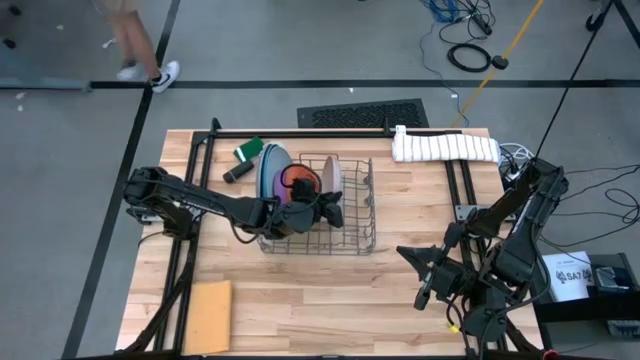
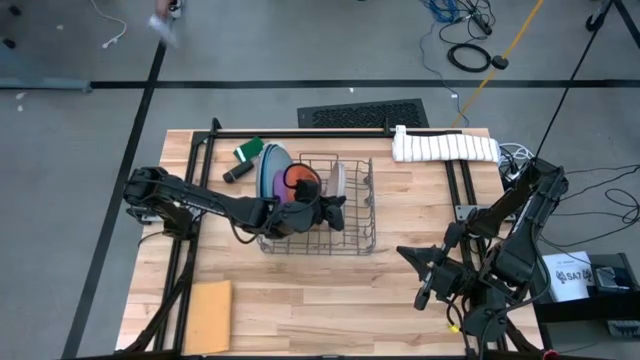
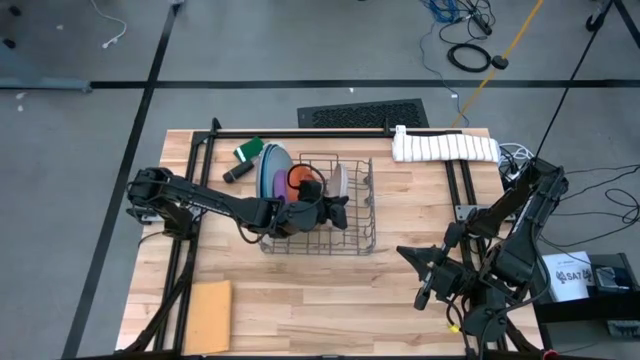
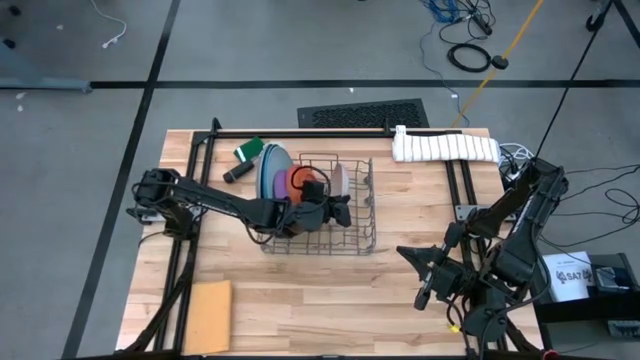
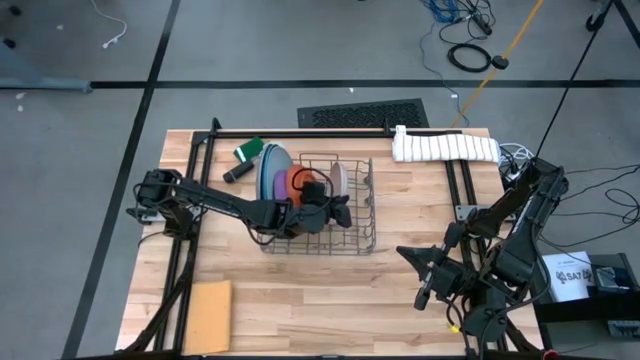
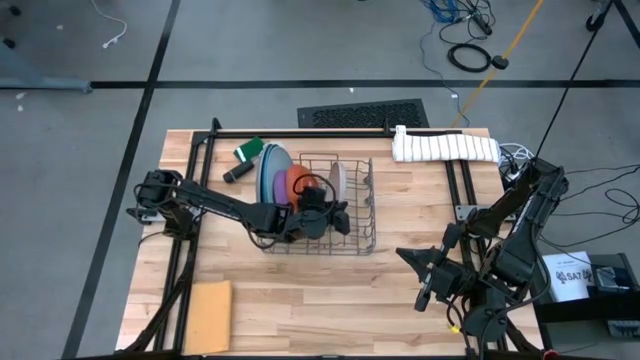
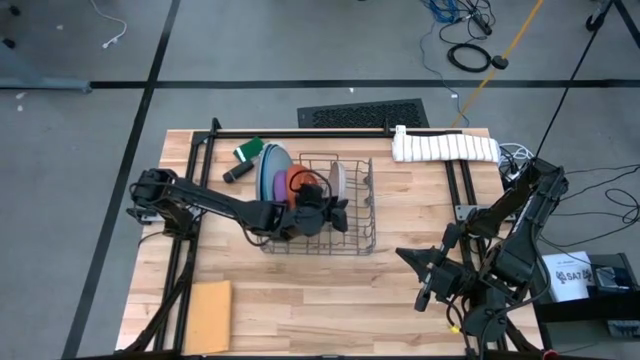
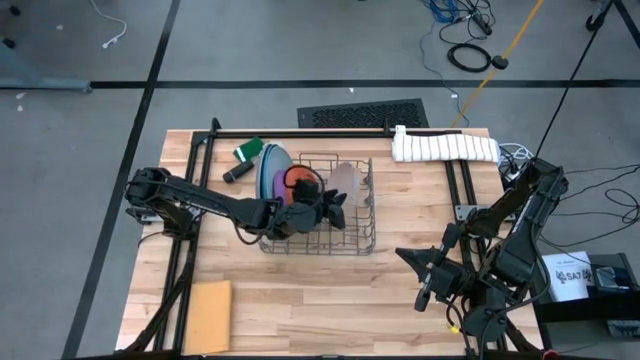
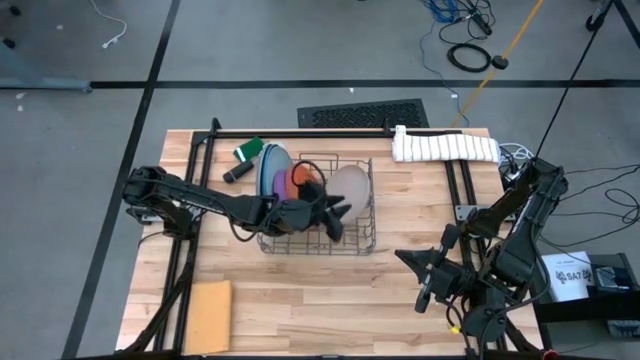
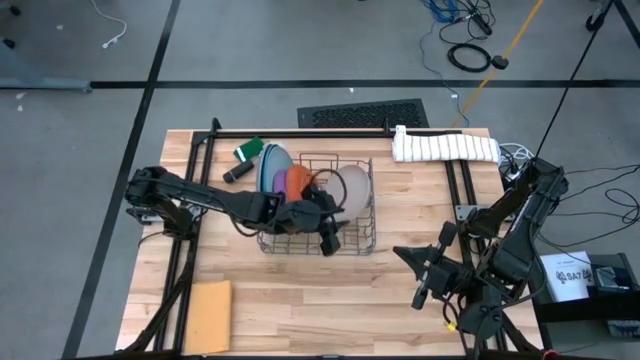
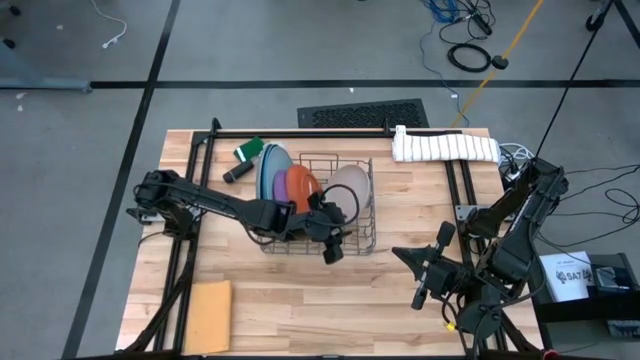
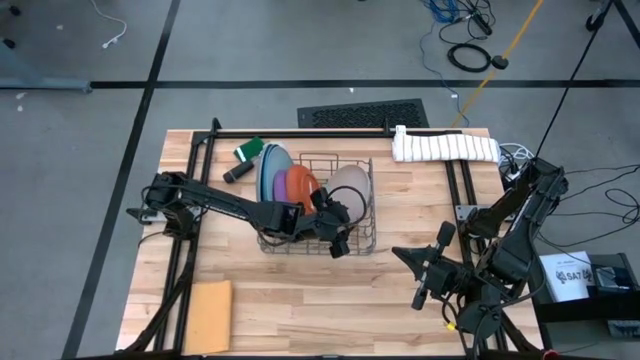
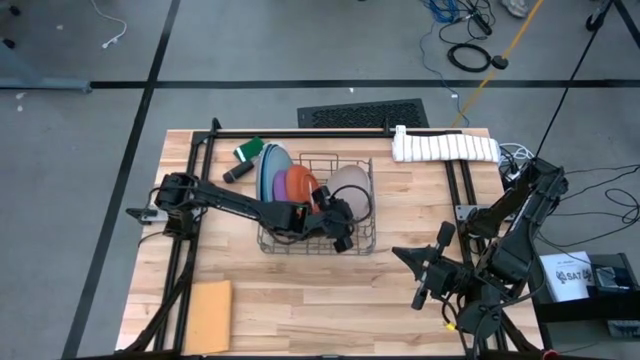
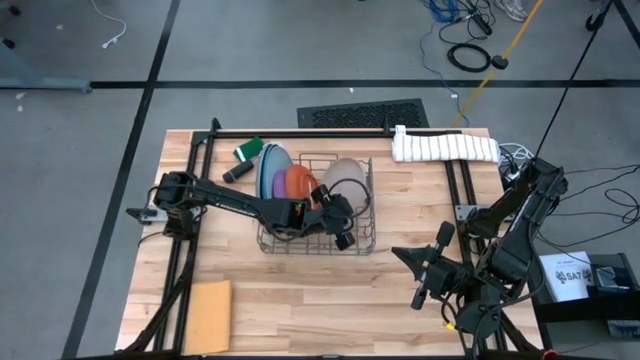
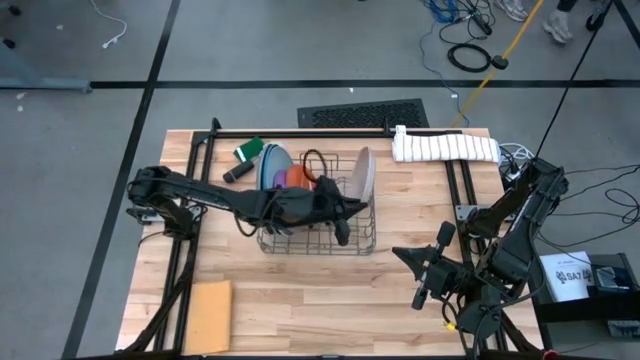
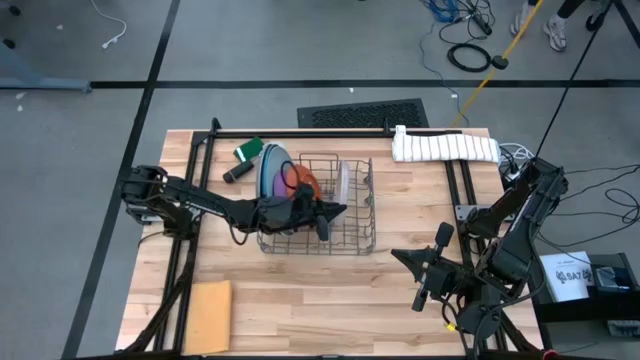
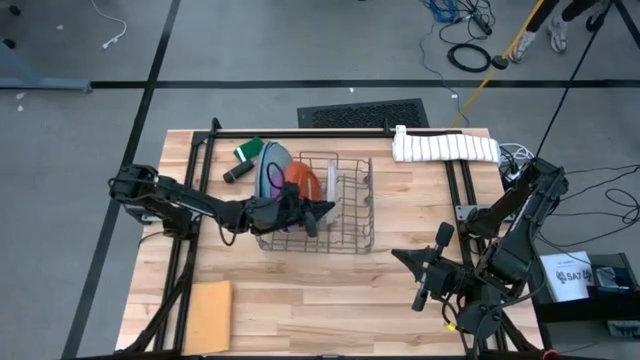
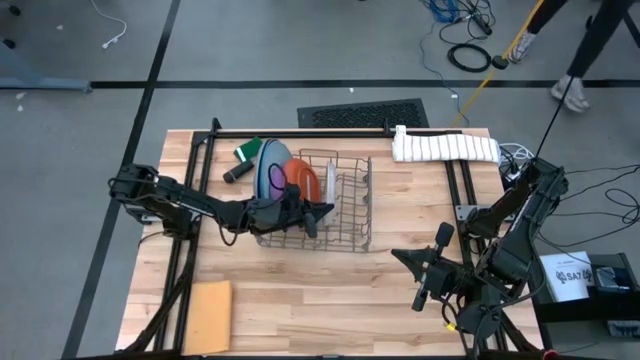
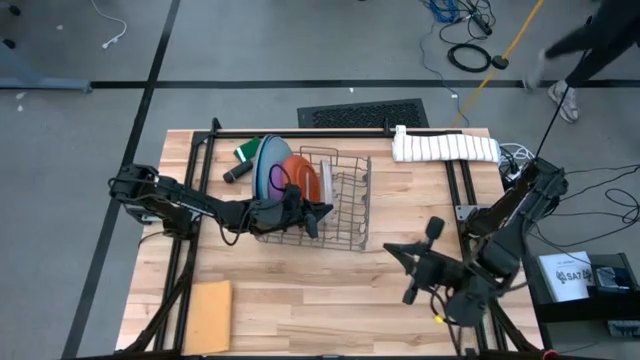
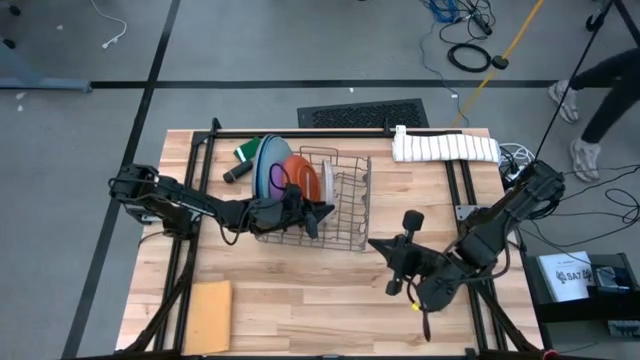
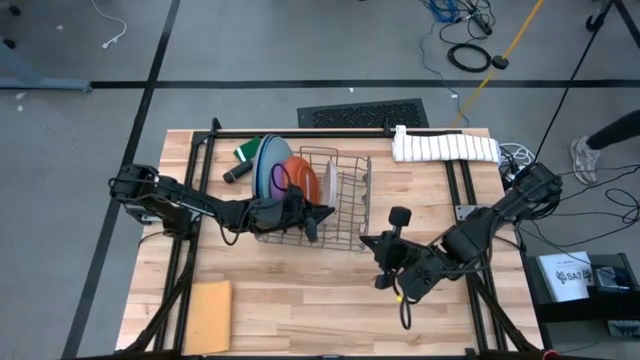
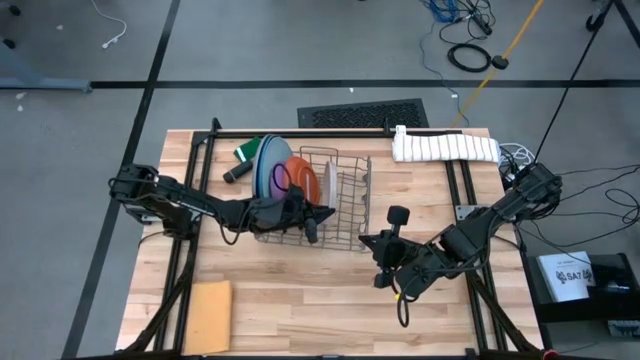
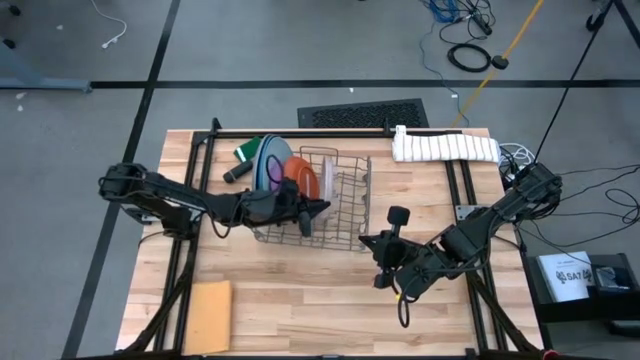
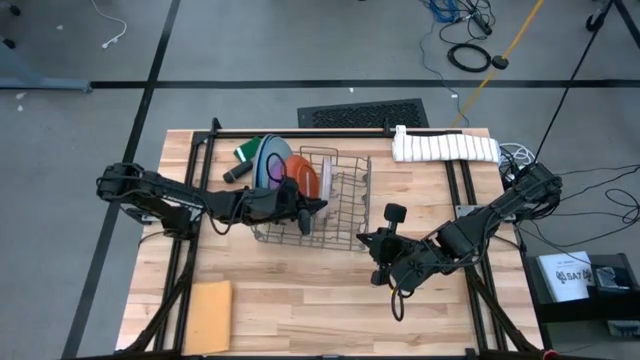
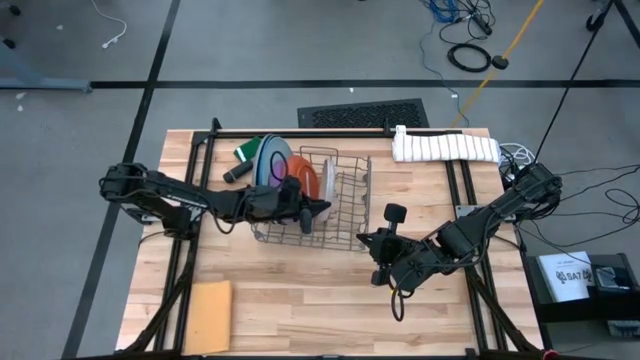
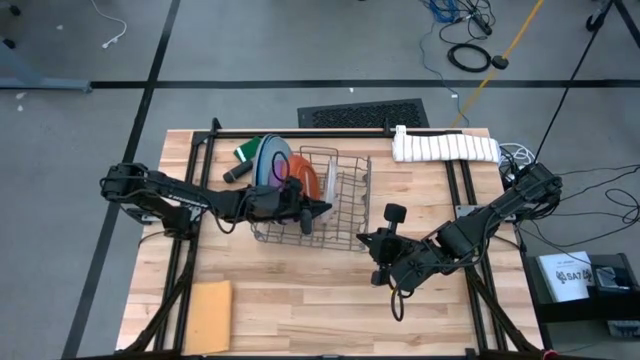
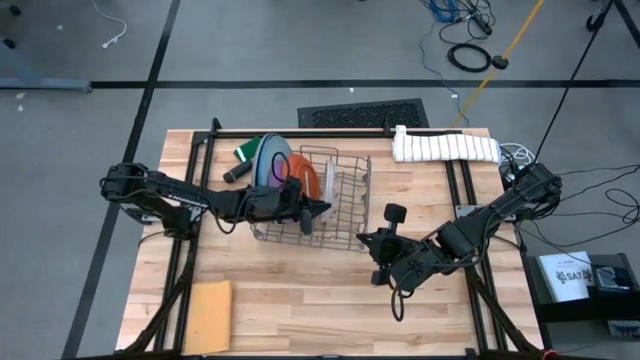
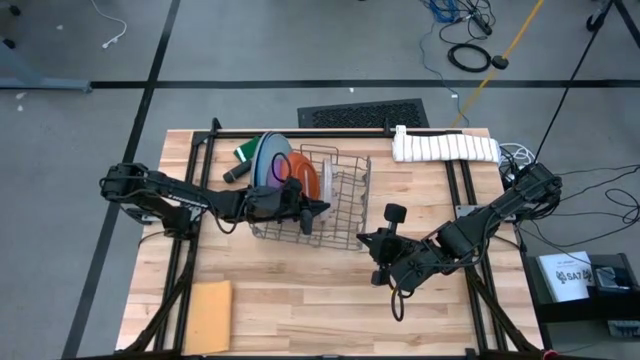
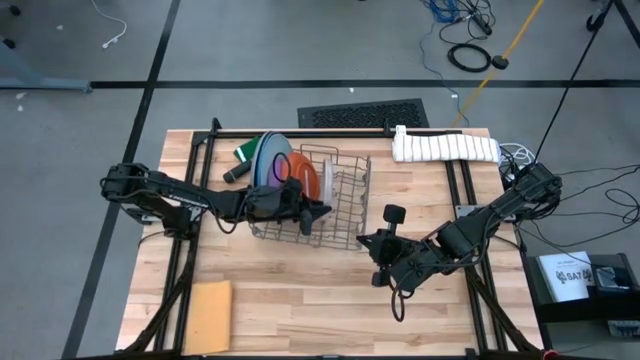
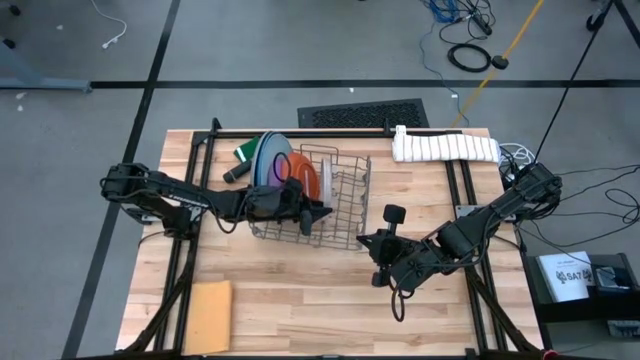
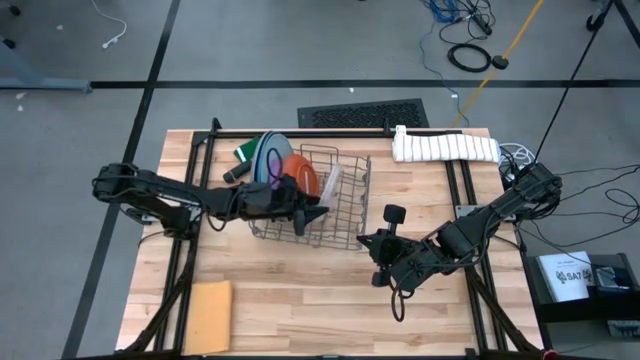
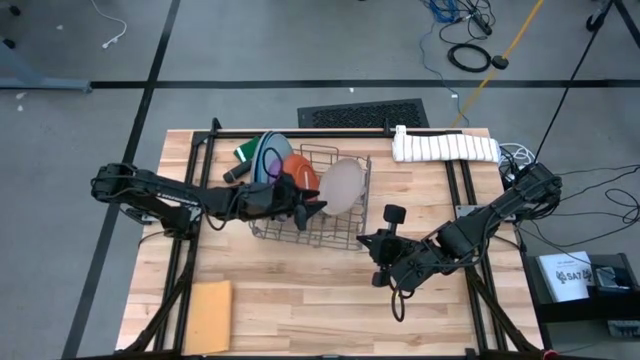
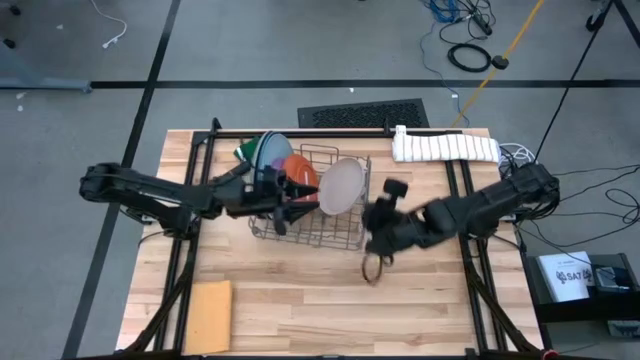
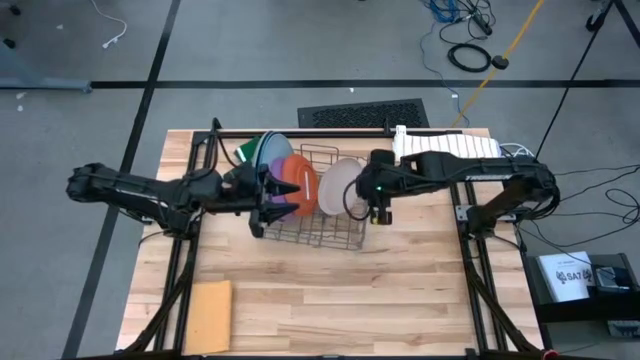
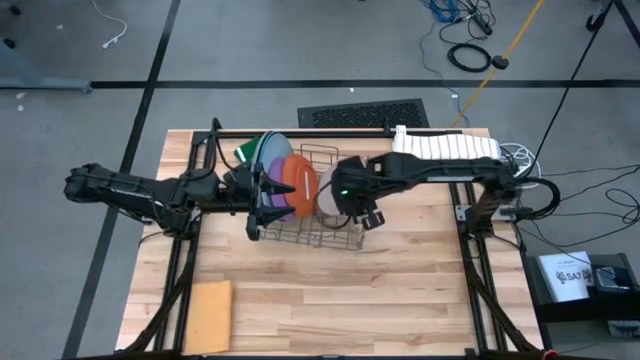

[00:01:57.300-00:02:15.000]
Task: Sort dishes
Put the white plate into the green dish rack
